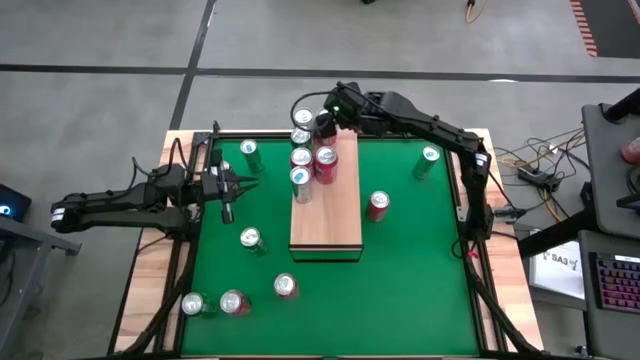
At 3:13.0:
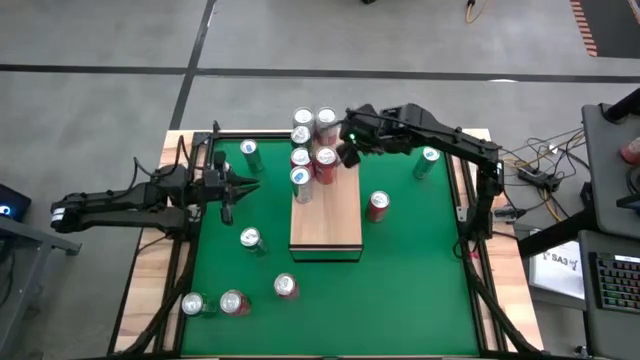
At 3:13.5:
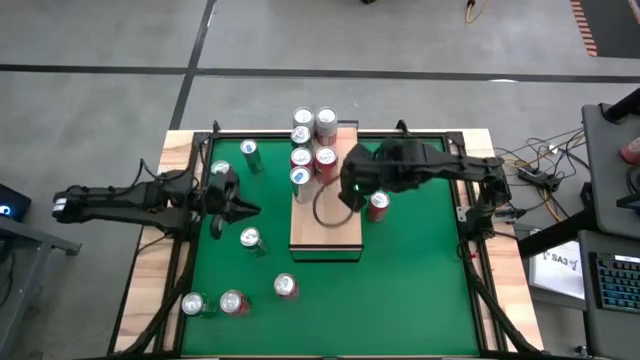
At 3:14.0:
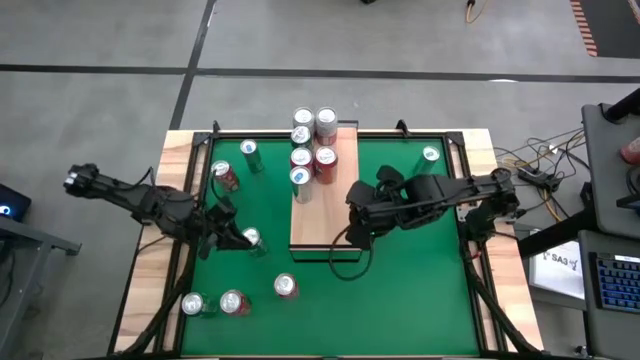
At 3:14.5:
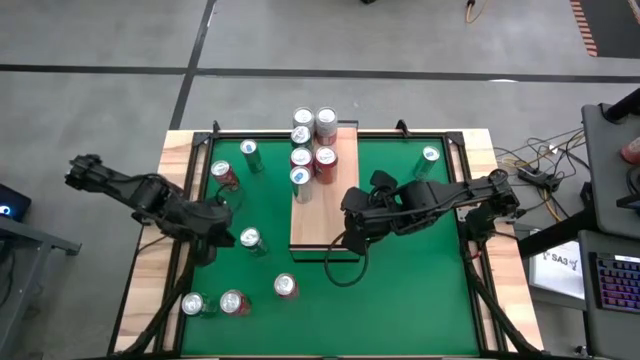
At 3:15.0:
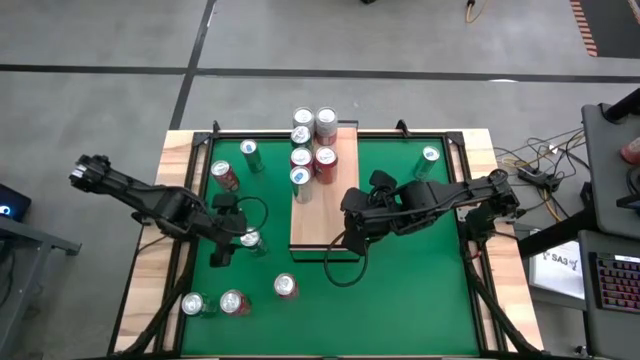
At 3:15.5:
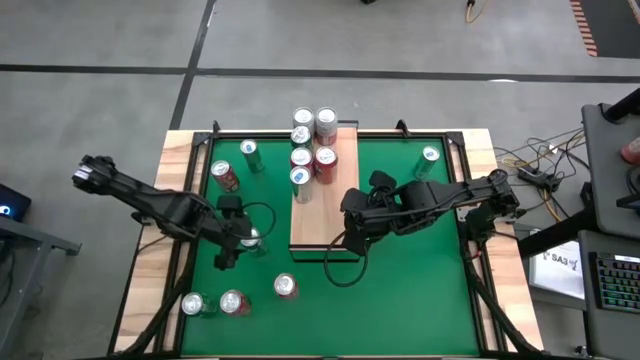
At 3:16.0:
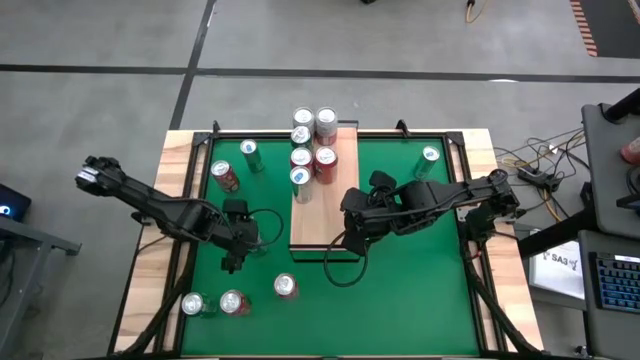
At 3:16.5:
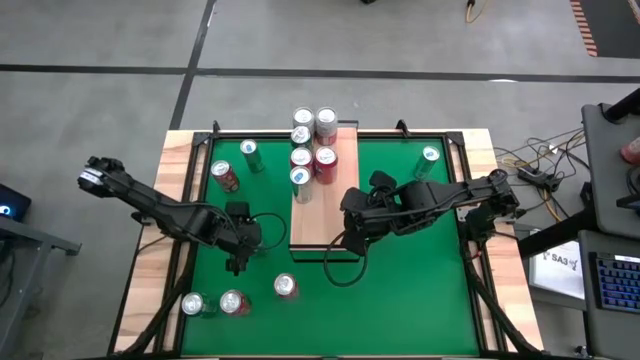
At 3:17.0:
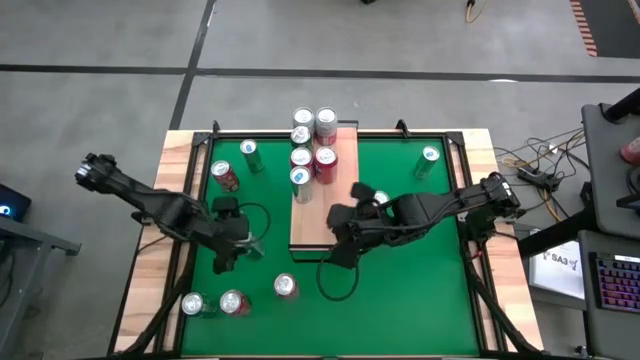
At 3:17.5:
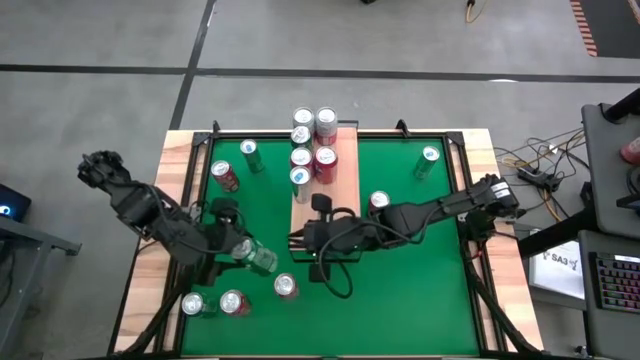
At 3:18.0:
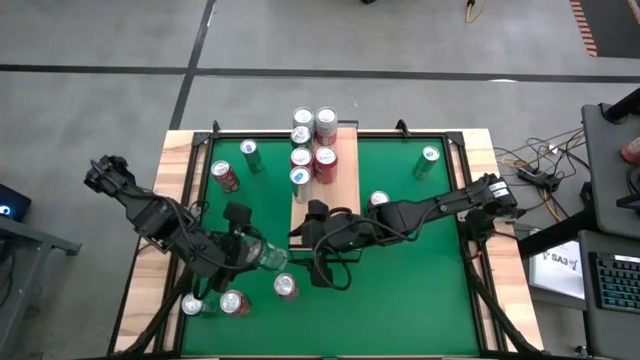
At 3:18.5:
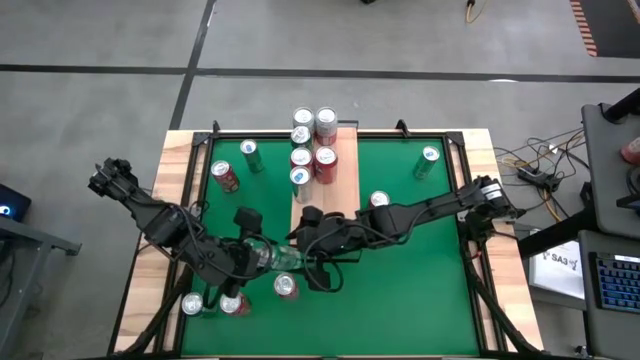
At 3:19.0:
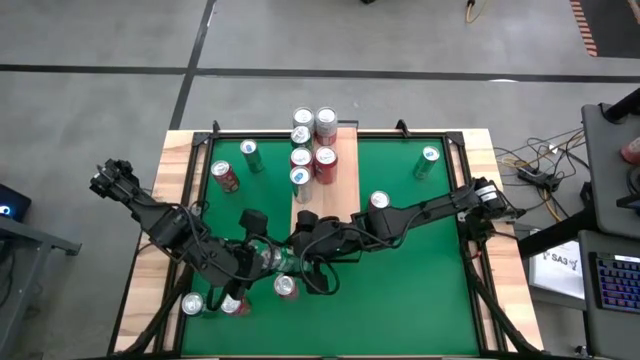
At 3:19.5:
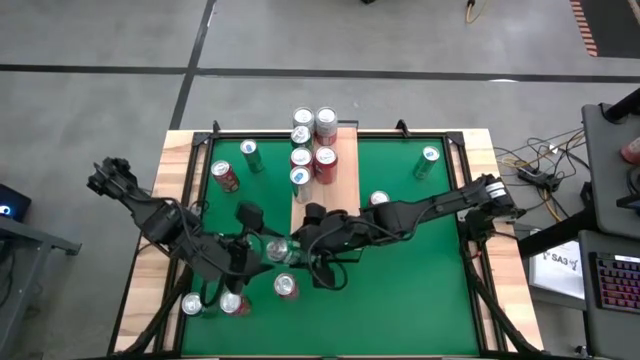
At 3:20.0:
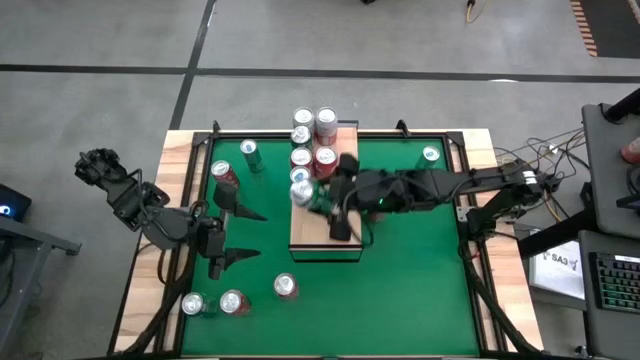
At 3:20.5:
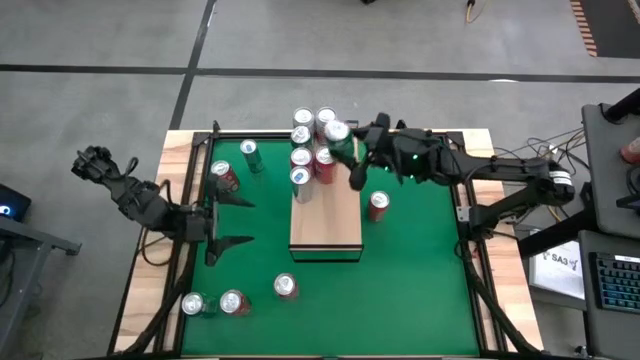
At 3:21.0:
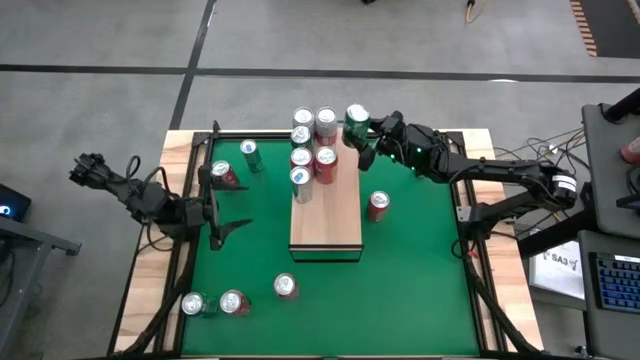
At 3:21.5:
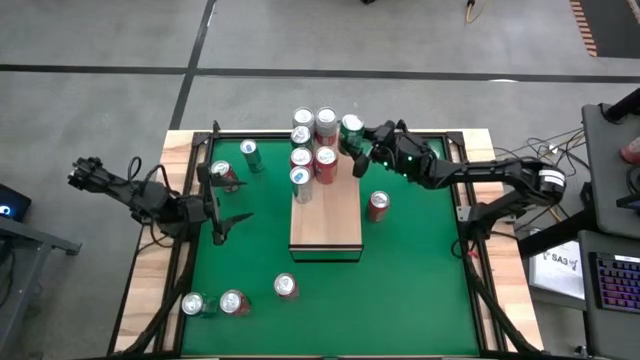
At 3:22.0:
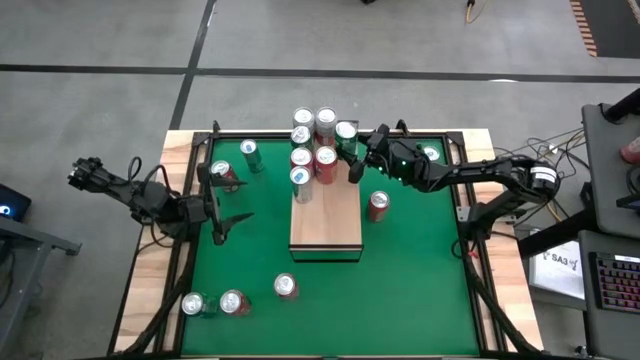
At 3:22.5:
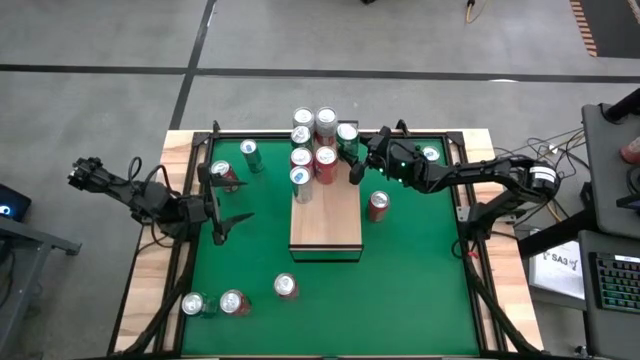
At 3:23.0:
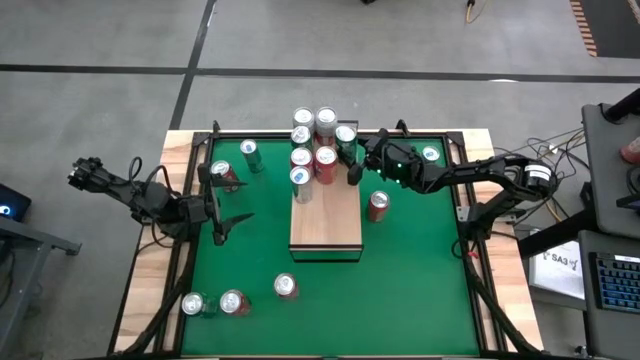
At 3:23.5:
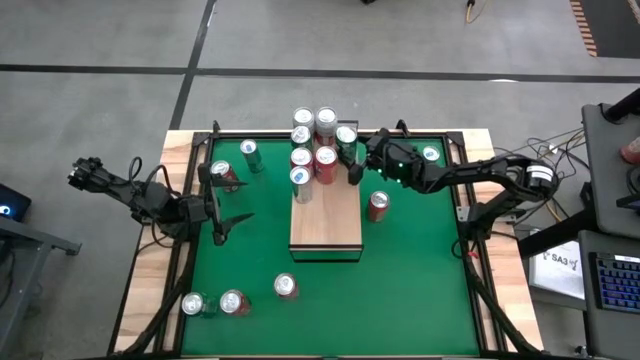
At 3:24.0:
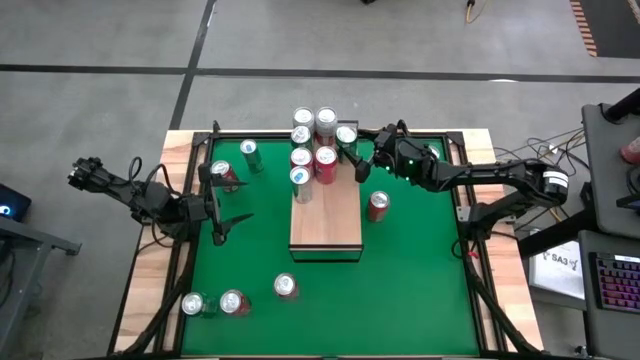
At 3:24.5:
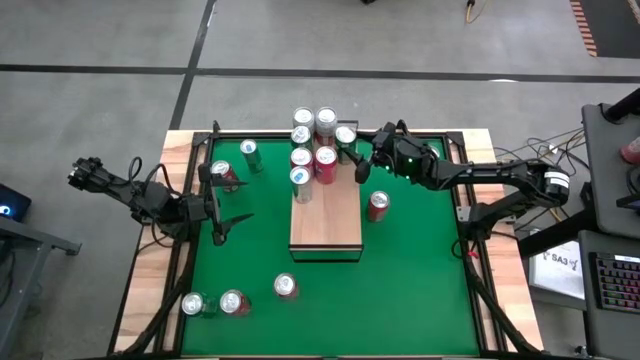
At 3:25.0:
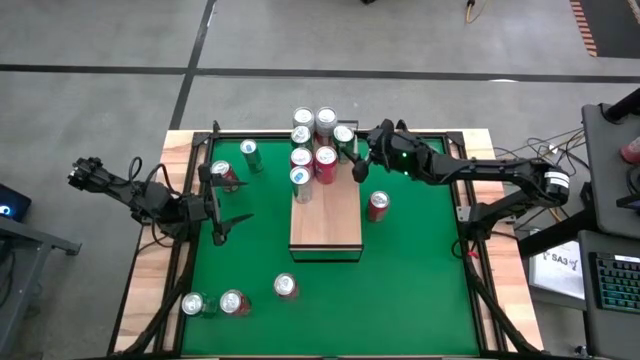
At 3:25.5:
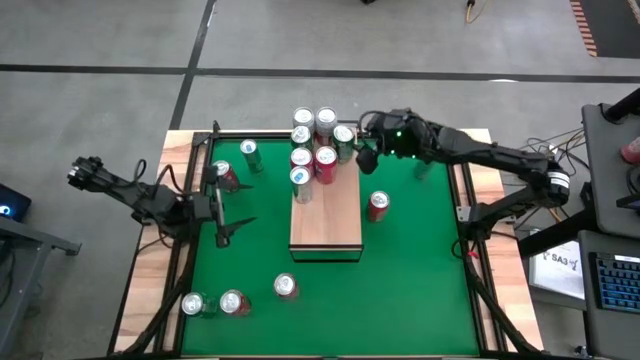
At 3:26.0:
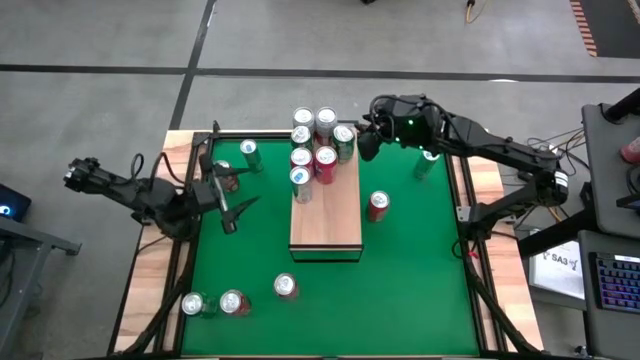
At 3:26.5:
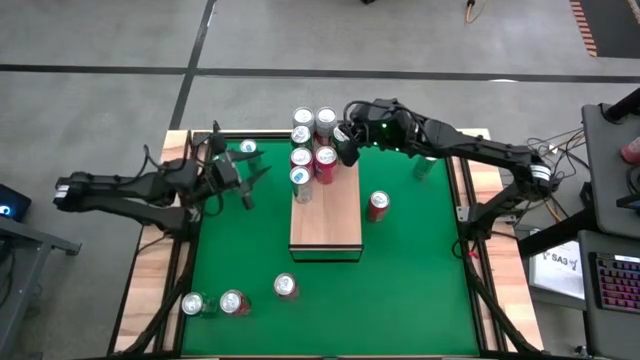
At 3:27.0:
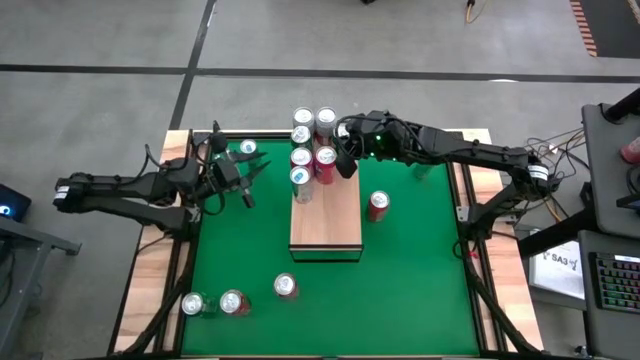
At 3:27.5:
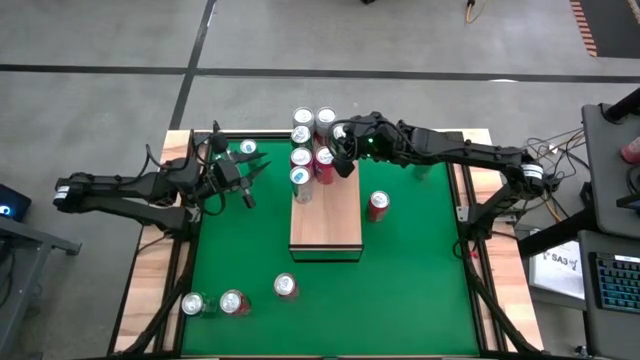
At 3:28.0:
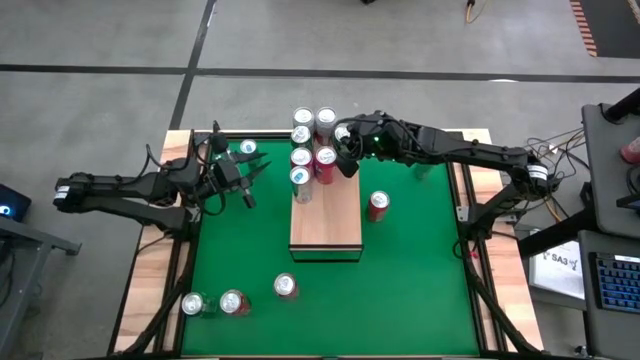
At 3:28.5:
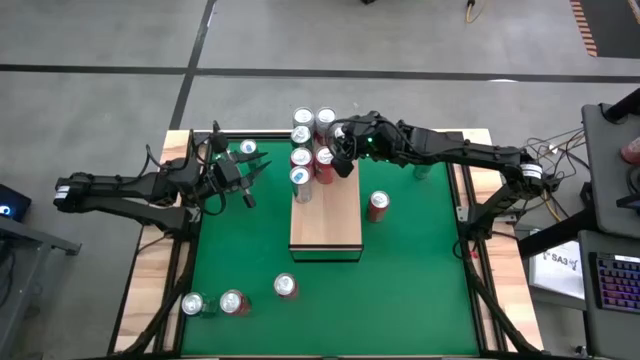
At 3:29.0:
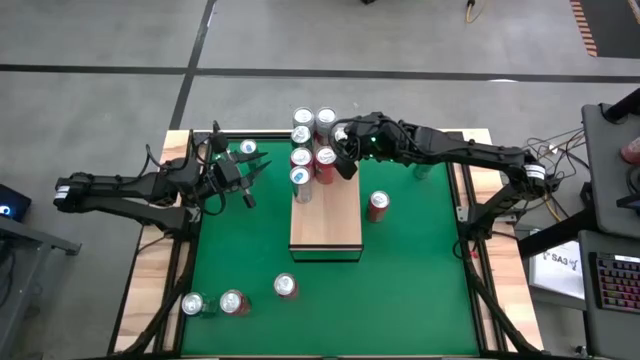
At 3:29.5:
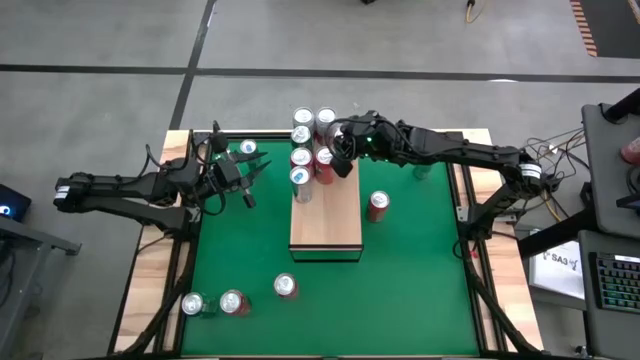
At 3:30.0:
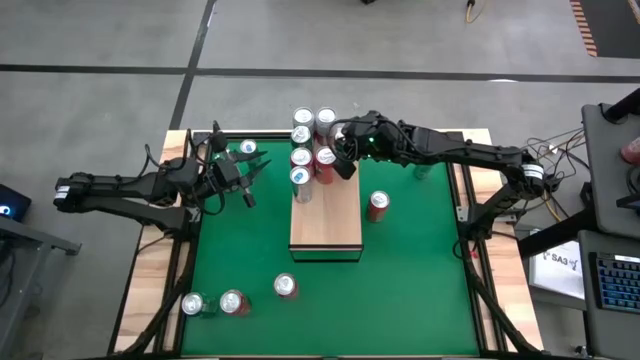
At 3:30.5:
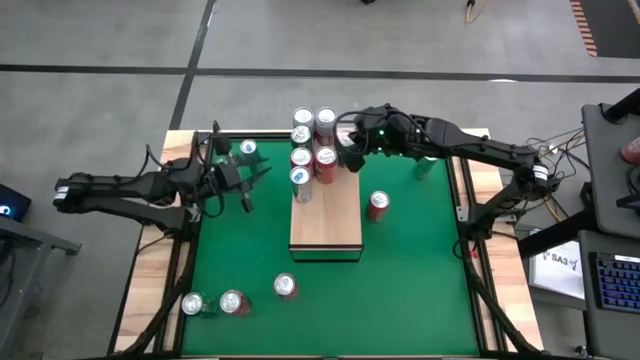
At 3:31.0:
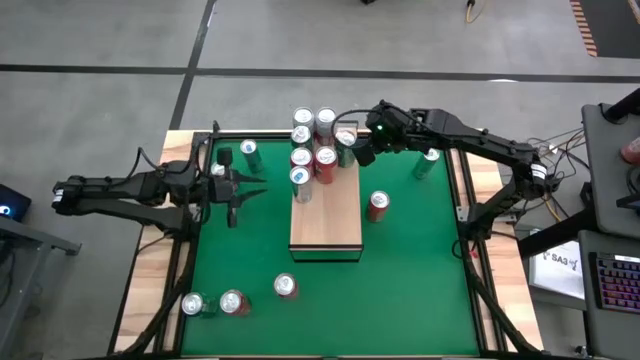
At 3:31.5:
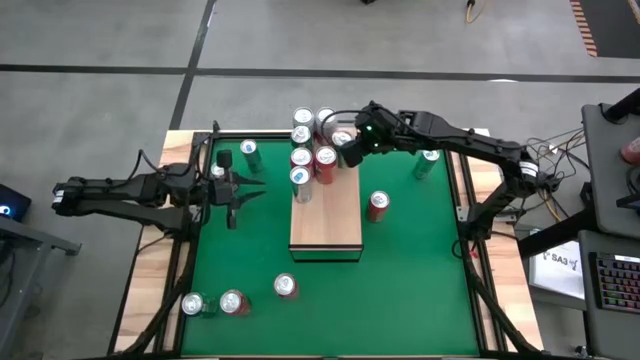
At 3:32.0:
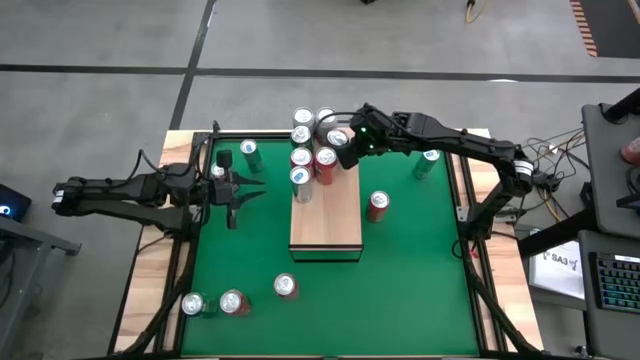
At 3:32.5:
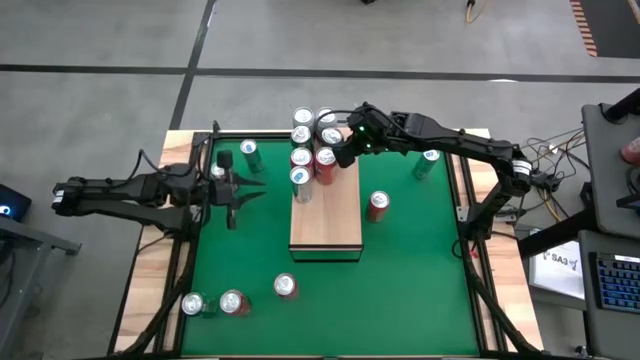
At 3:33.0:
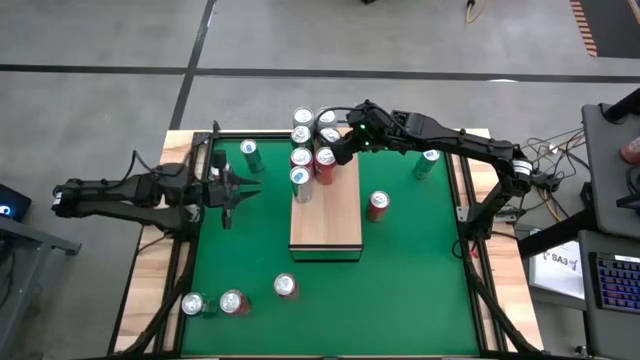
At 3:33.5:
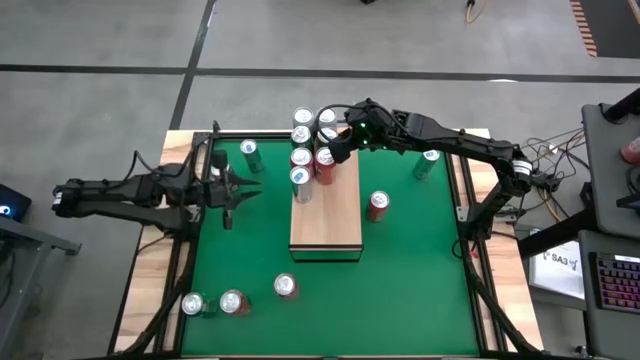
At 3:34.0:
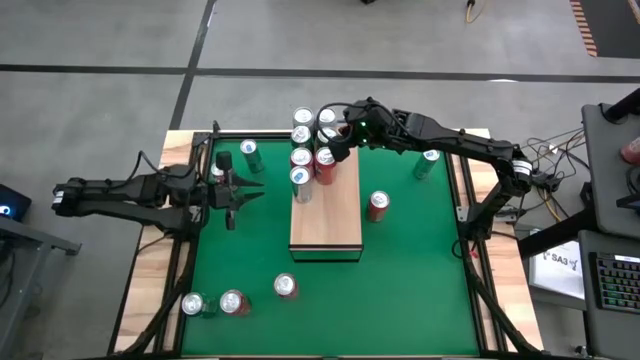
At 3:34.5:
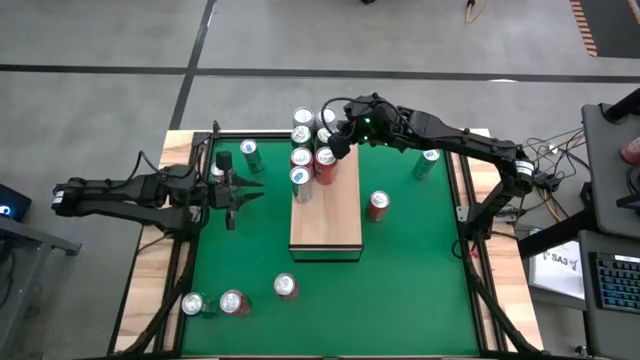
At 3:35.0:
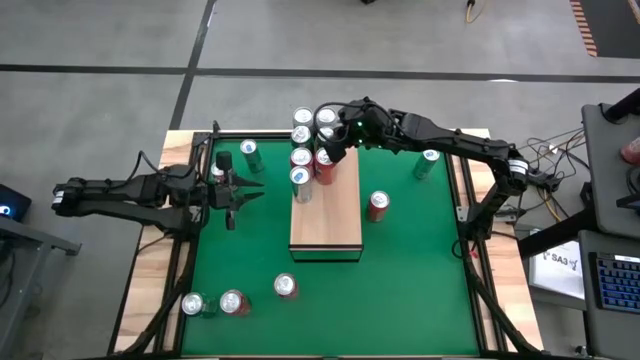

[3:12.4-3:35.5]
Task: Place canned beverage on shelf
Put the green can on the shelf
